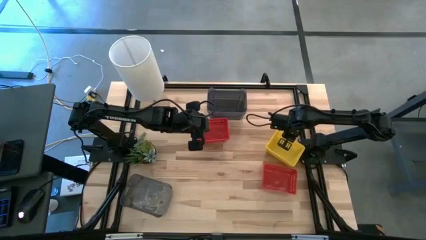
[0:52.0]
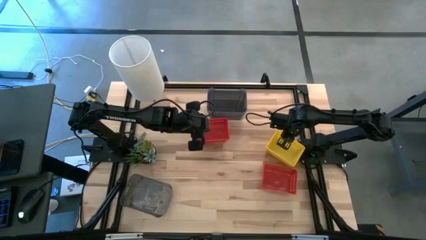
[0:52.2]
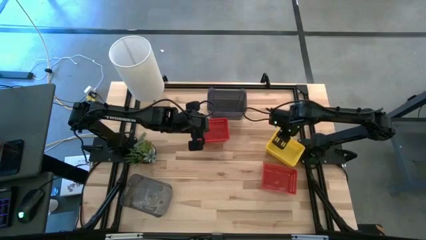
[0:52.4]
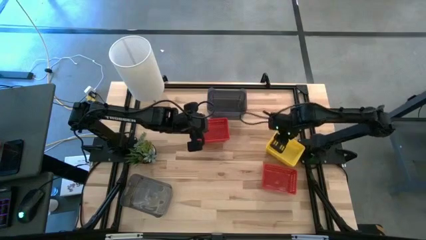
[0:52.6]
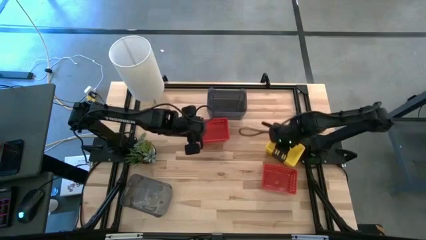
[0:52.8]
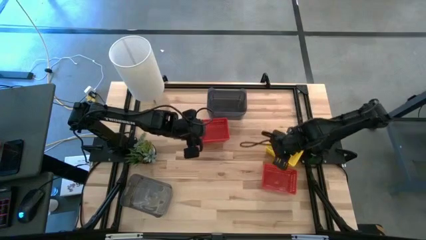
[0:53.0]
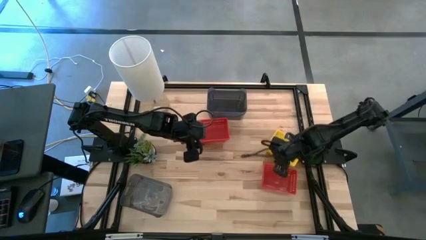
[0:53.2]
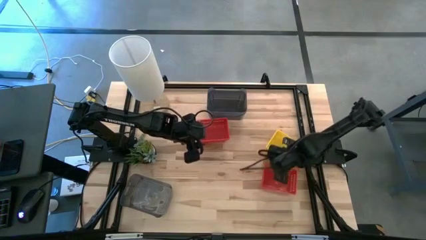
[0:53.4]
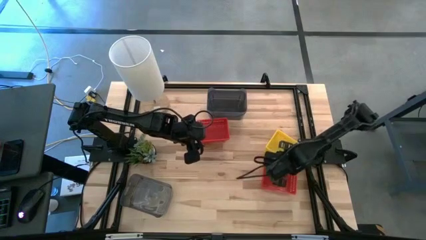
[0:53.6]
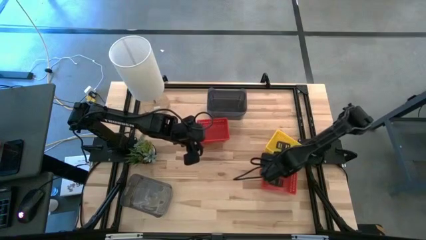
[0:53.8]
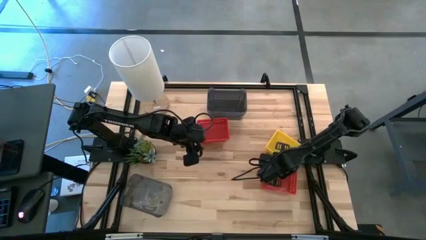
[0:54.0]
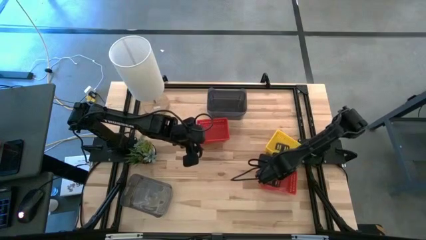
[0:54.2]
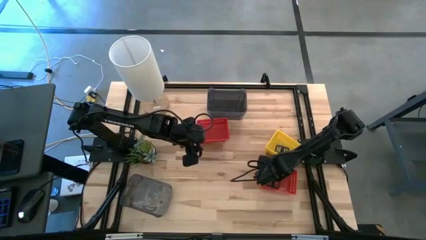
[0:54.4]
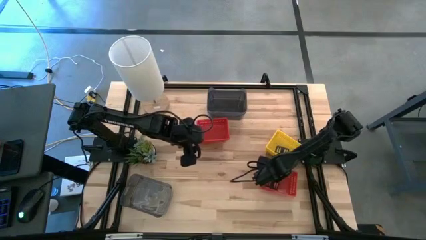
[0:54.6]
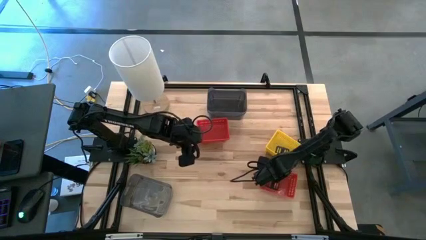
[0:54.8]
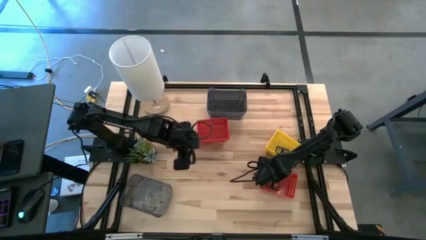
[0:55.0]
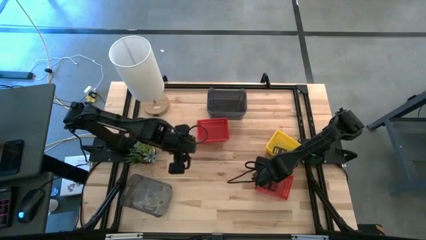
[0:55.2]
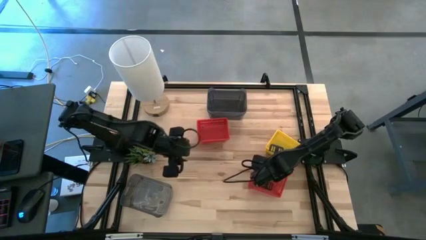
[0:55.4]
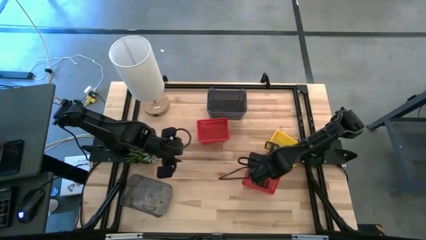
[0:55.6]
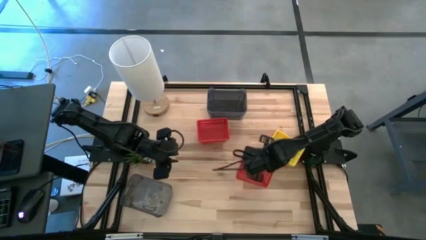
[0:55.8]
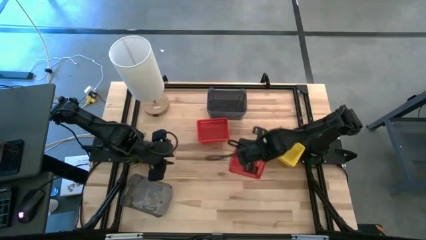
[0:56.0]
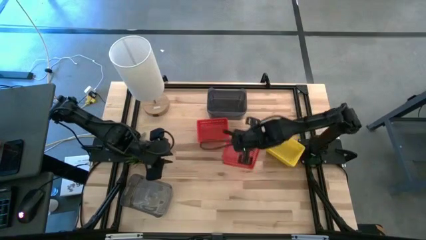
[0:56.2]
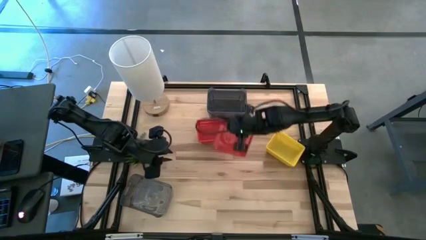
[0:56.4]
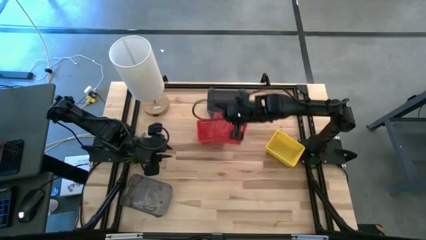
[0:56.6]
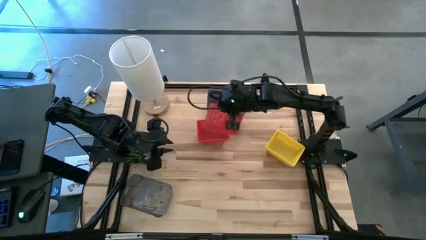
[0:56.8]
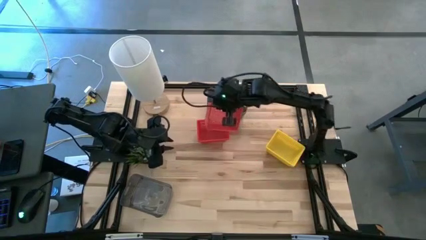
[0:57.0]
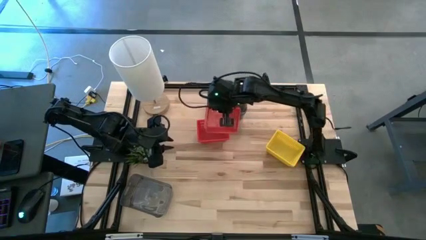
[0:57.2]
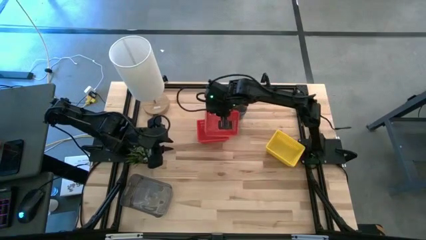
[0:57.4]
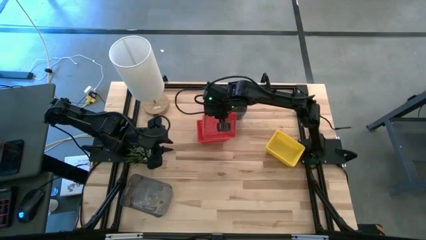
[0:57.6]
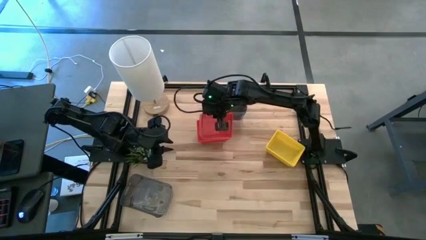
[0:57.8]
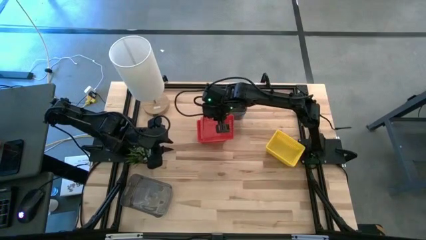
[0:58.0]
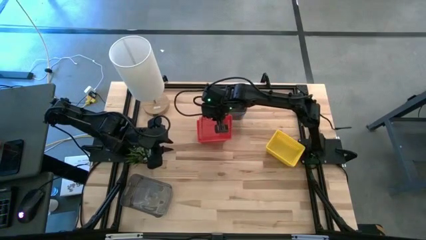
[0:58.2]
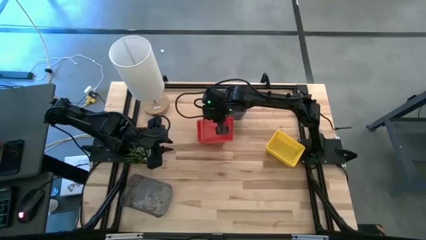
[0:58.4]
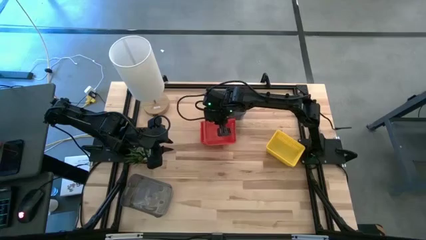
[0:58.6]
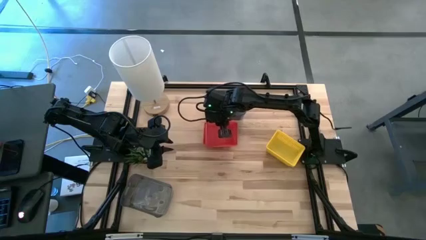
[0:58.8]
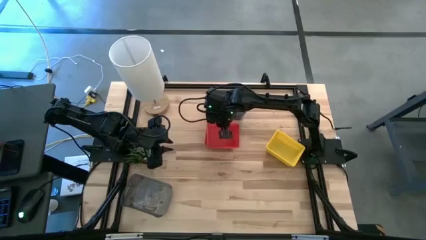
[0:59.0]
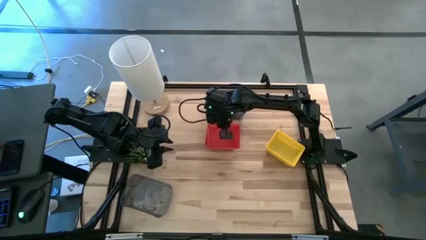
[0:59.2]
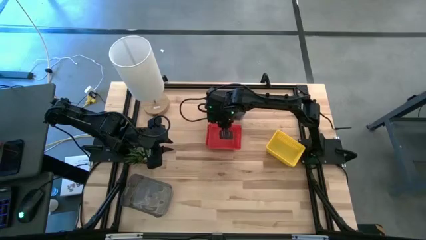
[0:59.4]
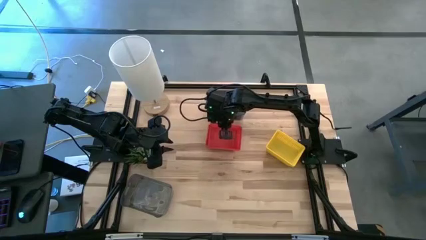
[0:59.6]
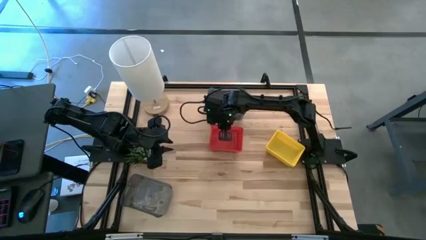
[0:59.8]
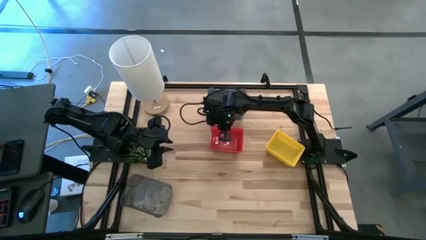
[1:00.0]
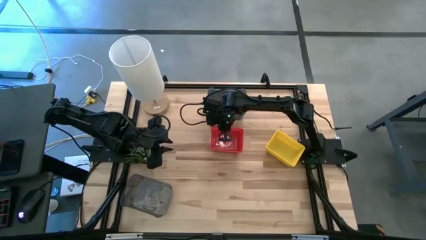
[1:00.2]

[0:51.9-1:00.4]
Stack the red bin on the stacked red bins

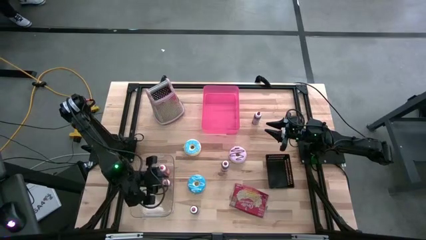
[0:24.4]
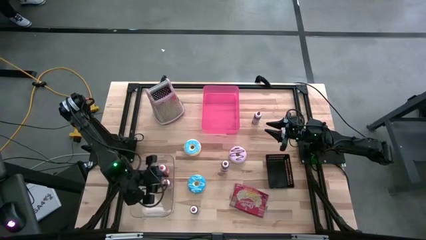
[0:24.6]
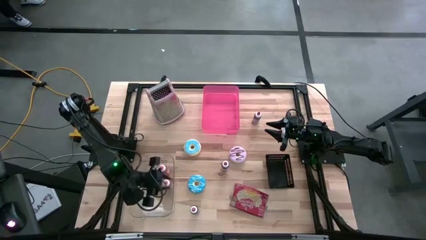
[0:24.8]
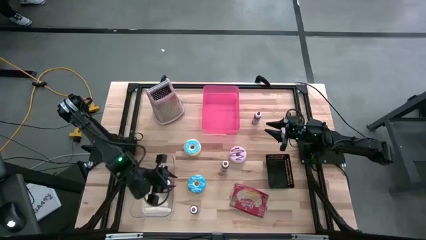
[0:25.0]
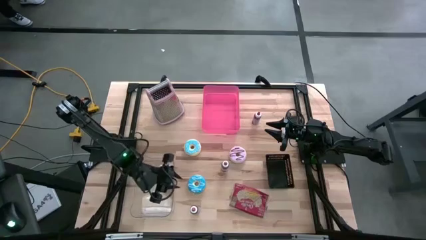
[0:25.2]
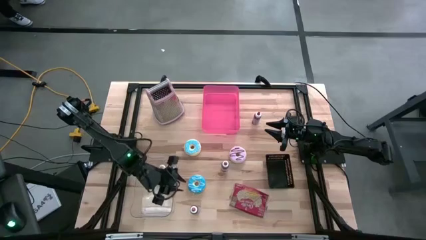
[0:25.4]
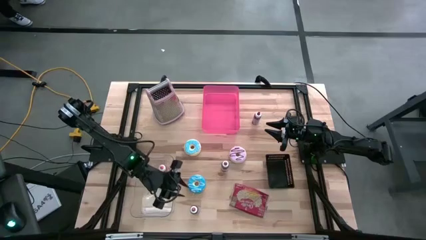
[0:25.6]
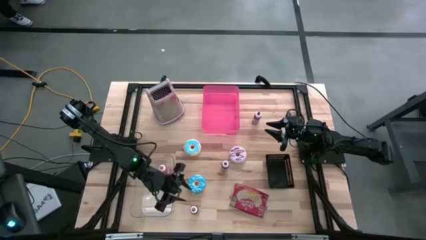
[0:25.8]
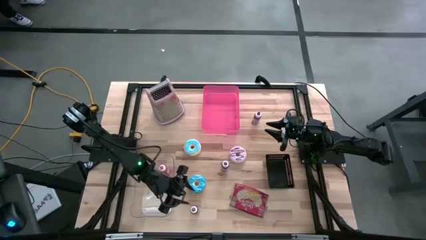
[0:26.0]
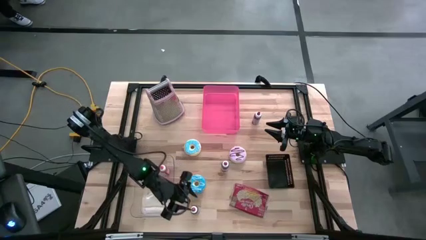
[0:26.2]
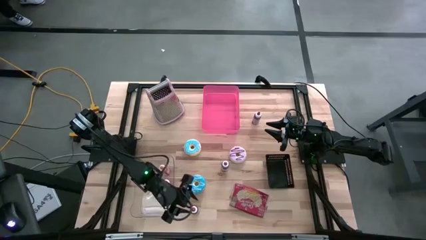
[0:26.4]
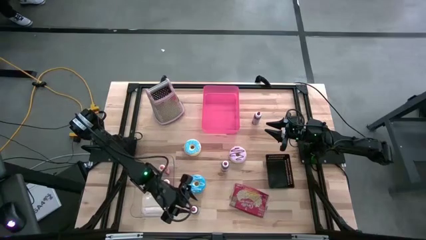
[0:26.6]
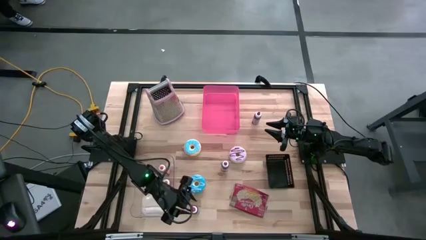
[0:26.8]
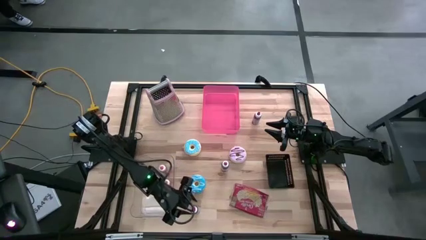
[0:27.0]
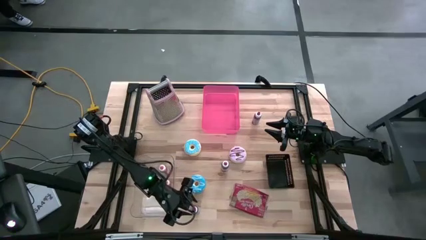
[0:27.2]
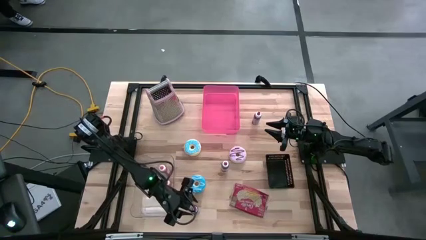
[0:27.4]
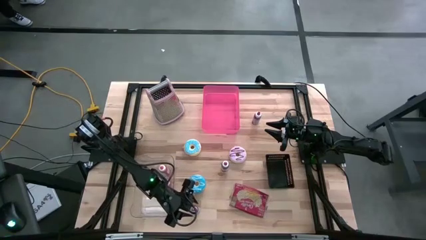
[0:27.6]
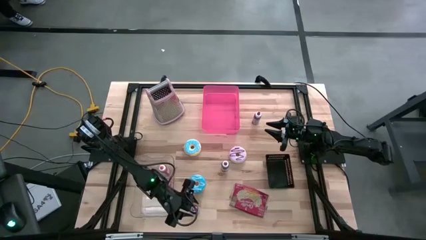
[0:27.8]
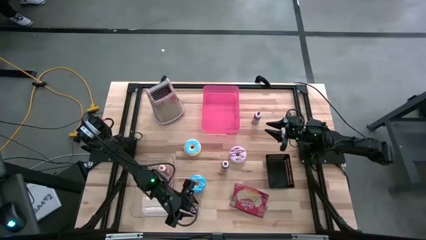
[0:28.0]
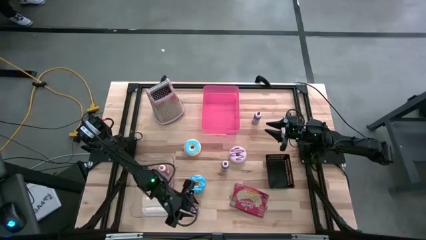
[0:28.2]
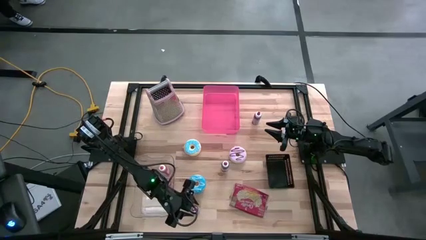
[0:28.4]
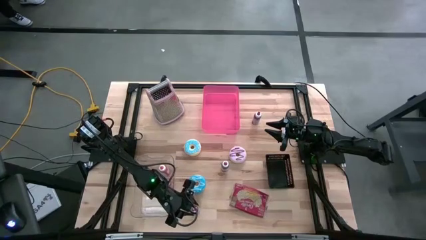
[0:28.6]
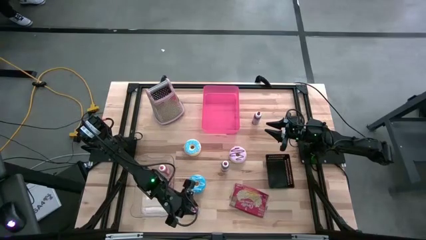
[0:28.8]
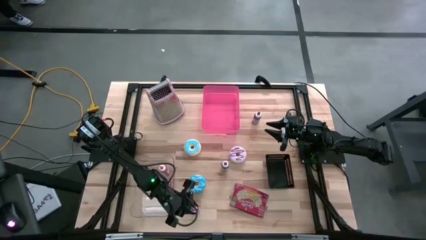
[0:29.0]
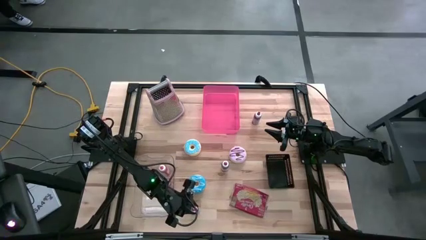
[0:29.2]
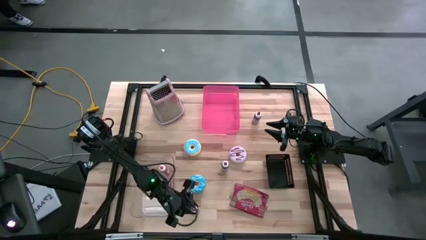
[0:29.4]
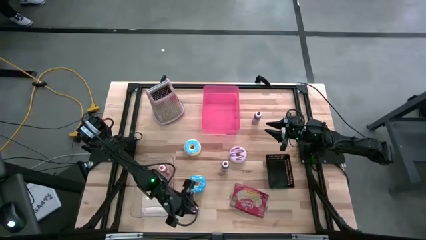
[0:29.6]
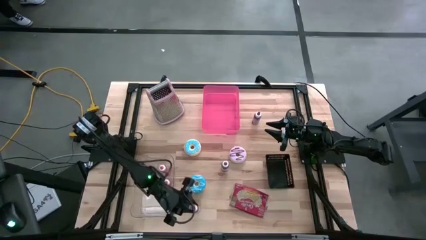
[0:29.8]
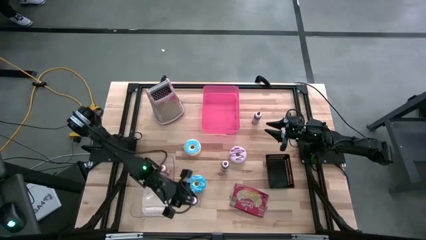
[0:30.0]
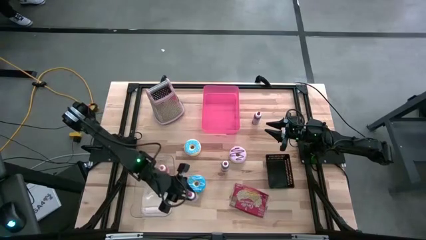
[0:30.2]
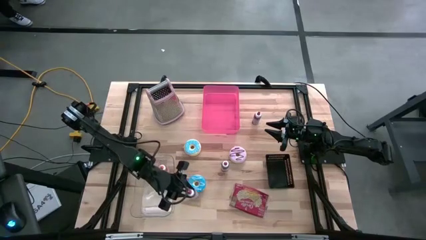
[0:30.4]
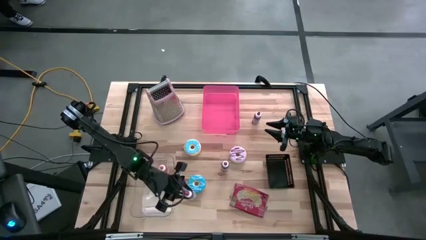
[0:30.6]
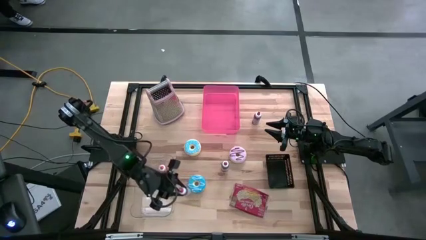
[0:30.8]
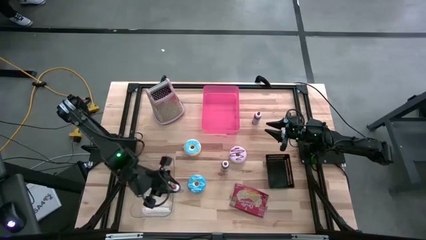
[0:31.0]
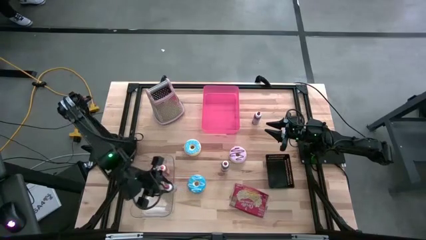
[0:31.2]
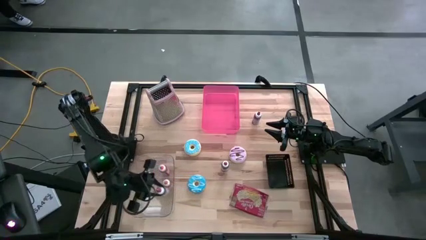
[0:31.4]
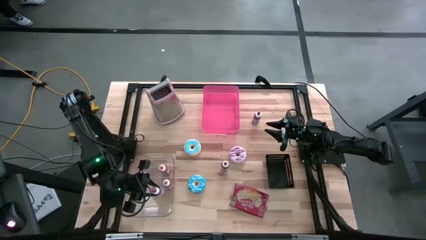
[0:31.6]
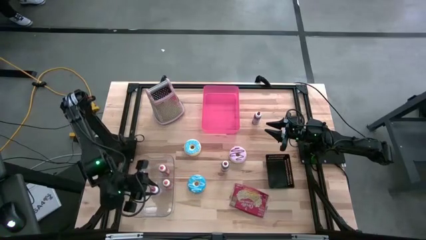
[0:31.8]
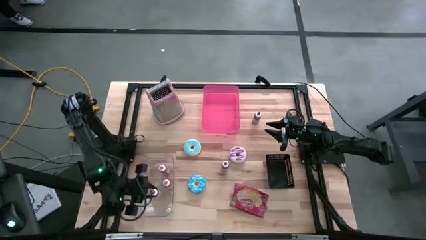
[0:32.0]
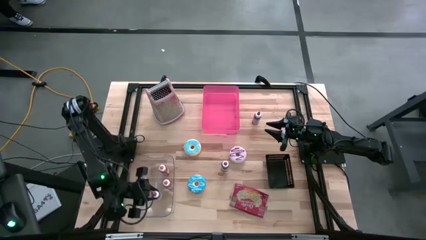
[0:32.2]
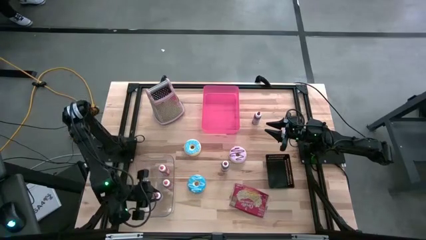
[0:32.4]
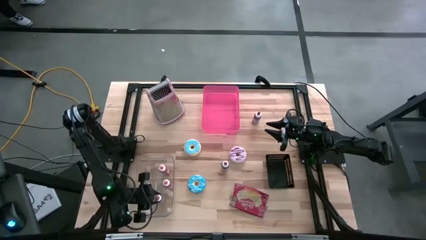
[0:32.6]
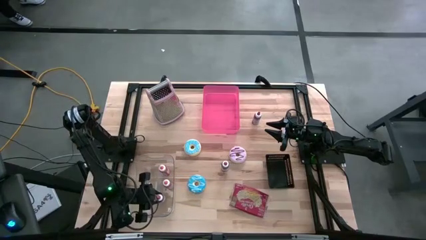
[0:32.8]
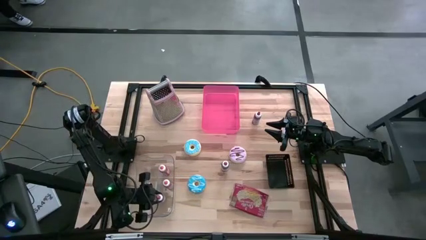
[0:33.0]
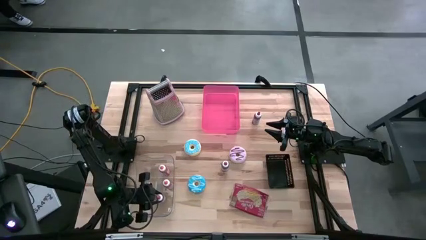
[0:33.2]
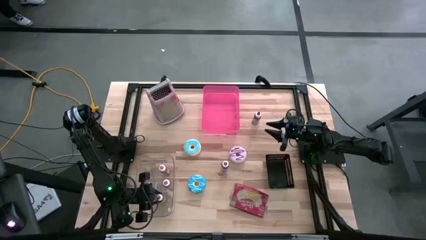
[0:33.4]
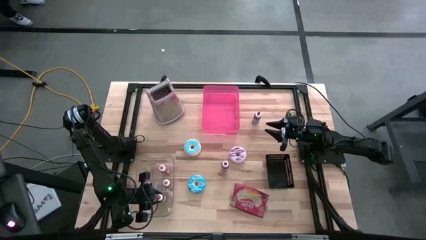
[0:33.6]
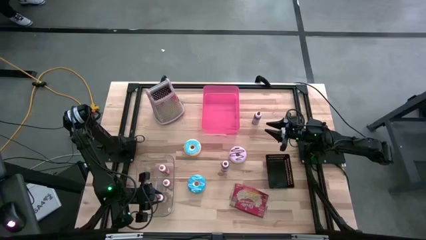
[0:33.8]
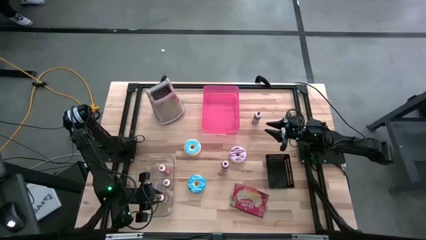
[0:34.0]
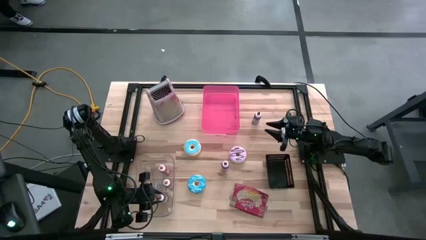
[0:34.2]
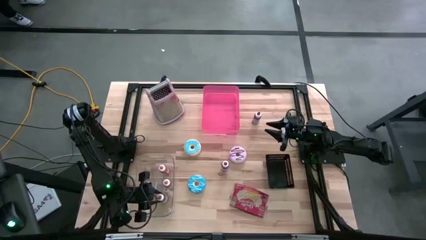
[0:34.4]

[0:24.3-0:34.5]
Put the bottom red large food coloring bottle into the transparent bin
